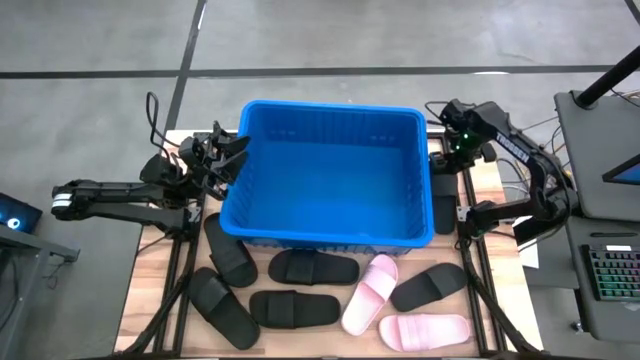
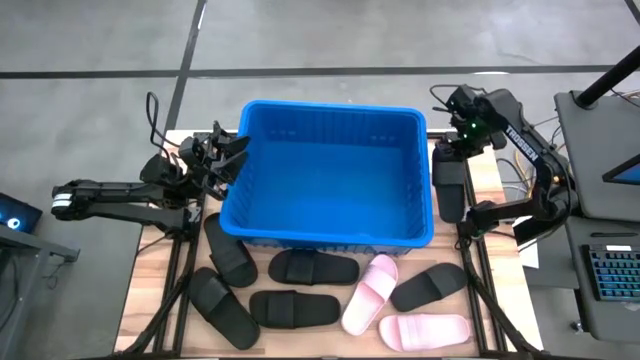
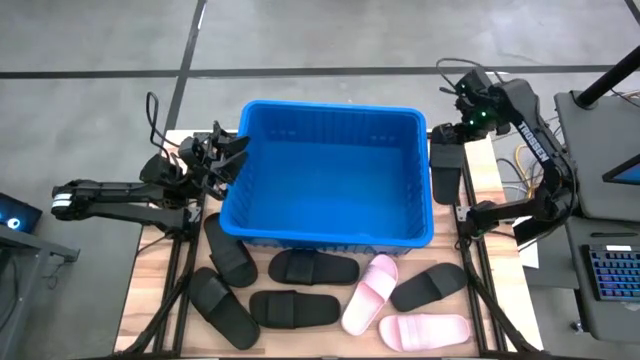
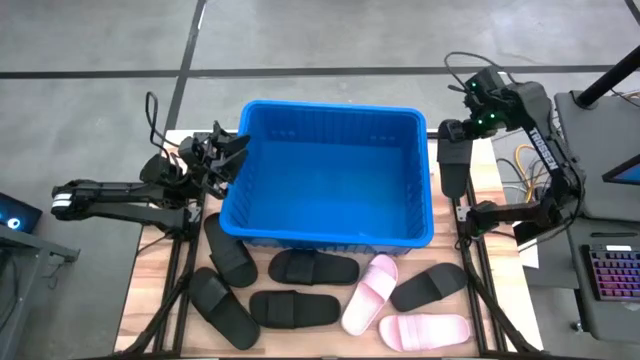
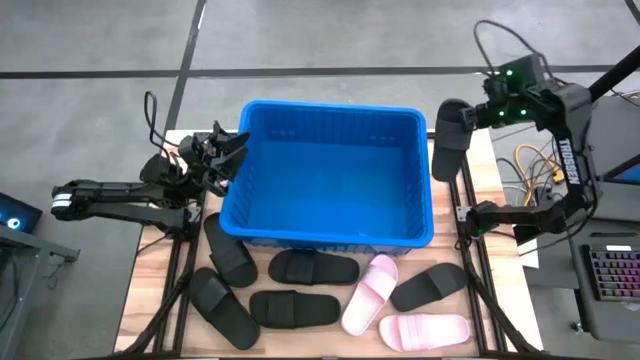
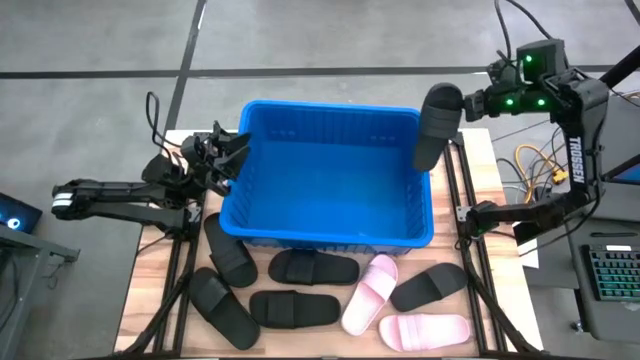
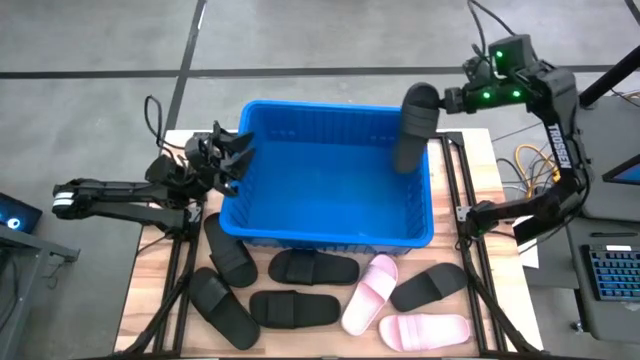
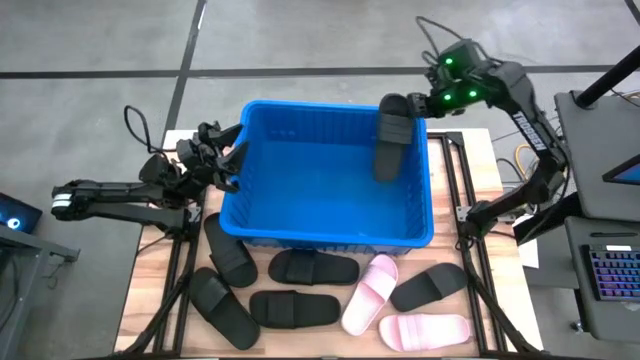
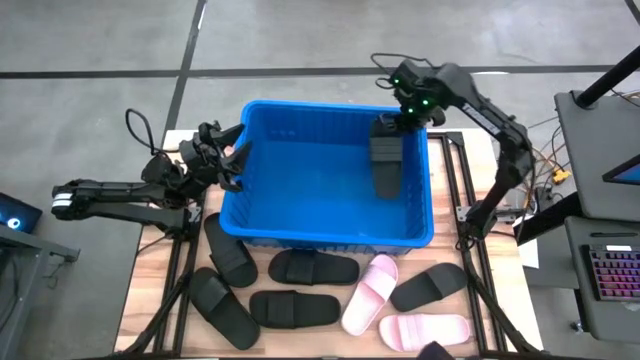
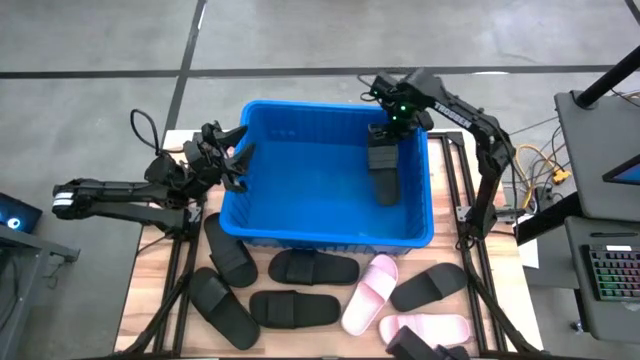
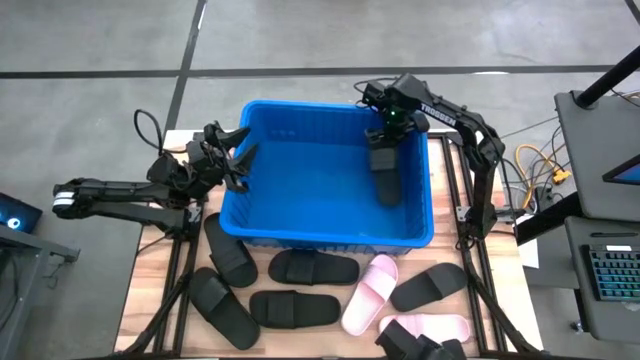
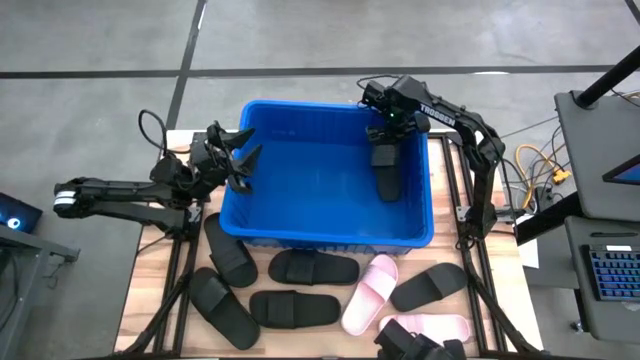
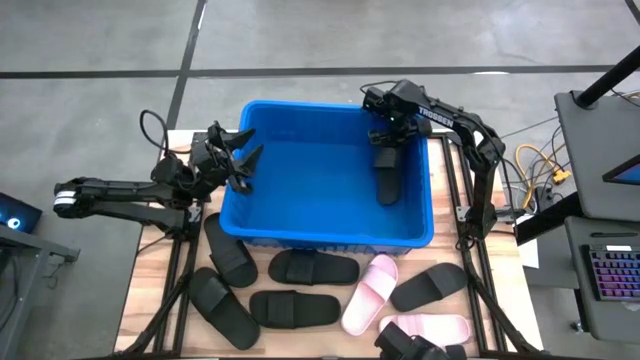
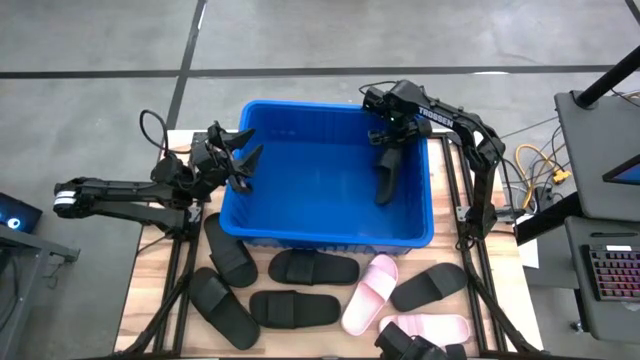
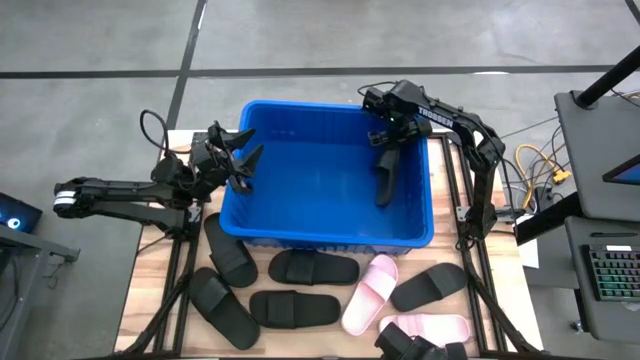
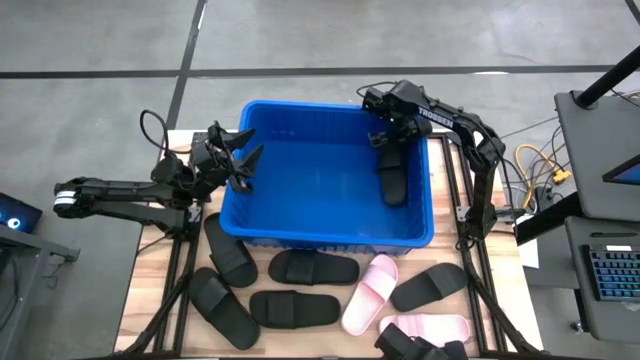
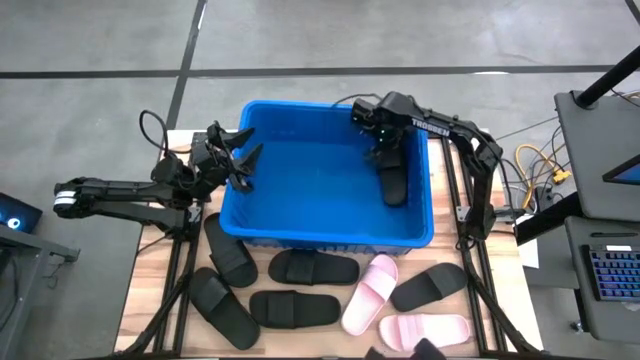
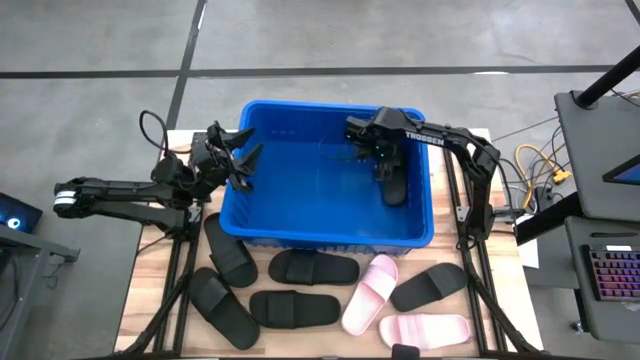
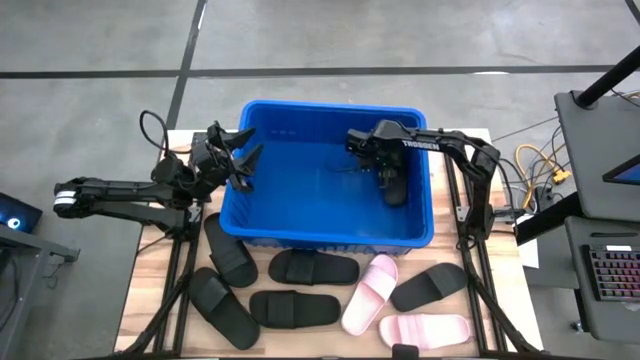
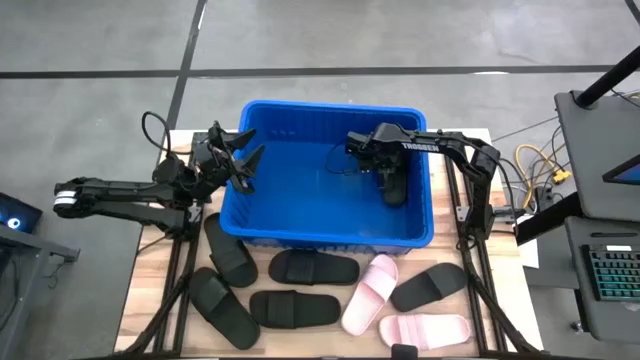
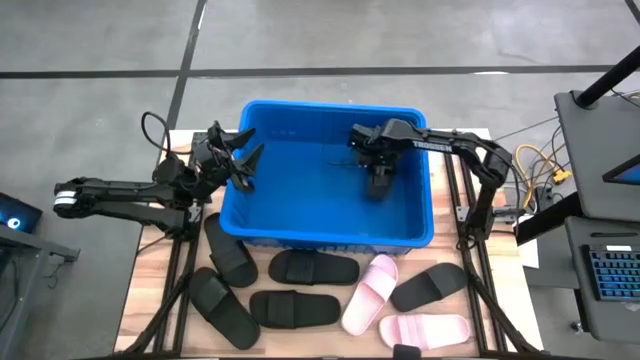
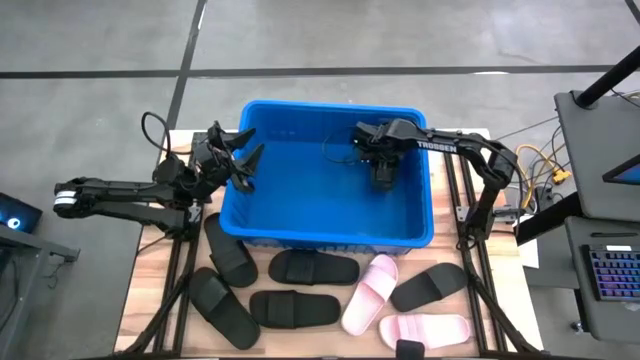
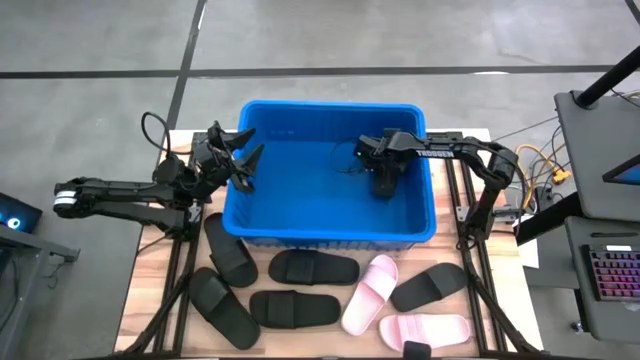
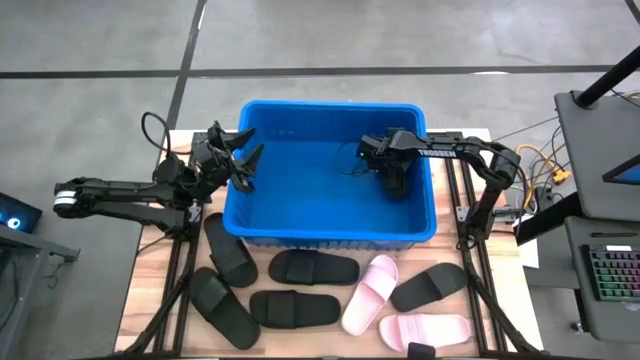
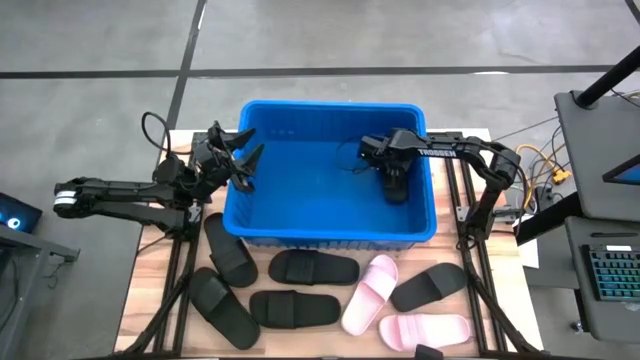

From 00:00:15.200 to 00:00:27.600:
Task: Pick and place slides into bin
Put the black slide into the blue container

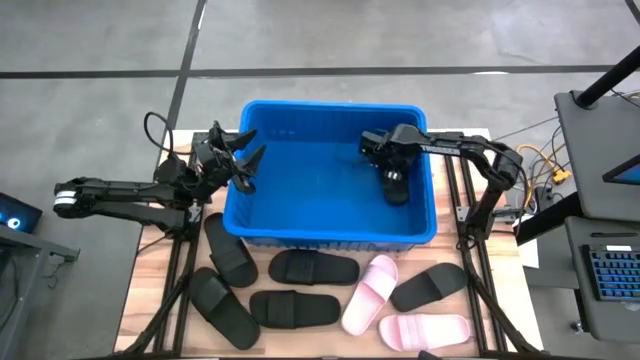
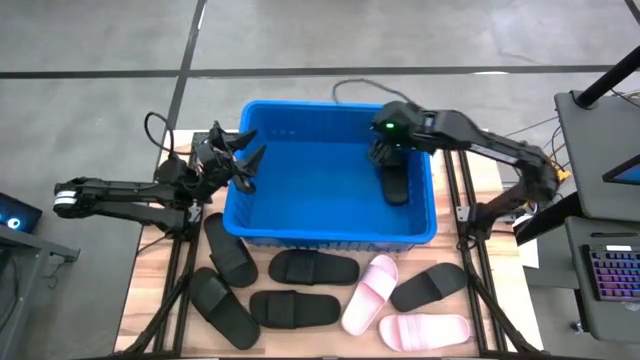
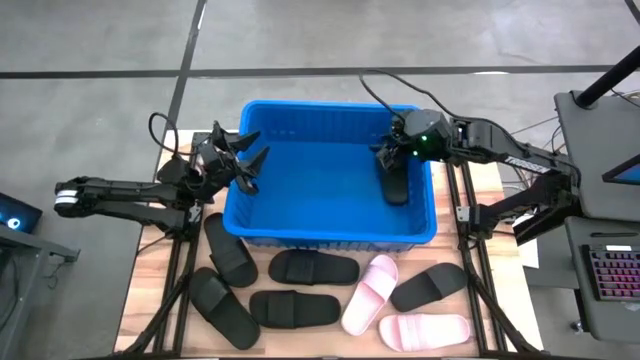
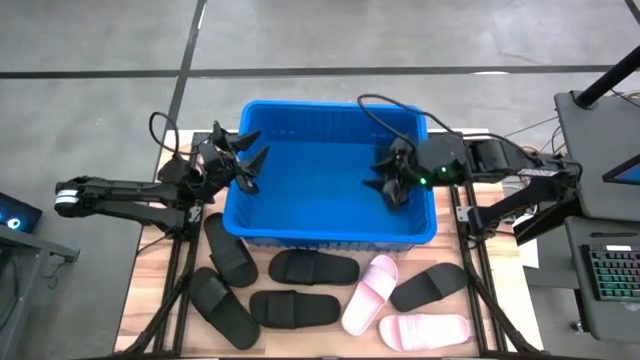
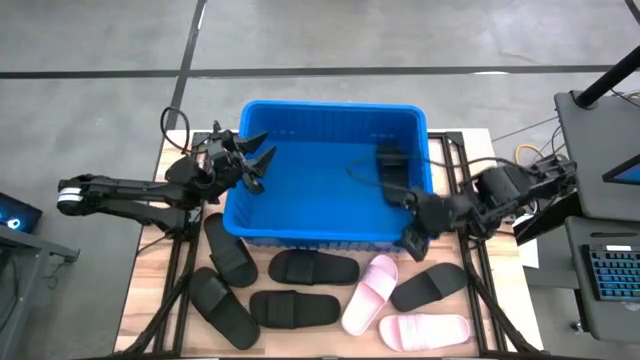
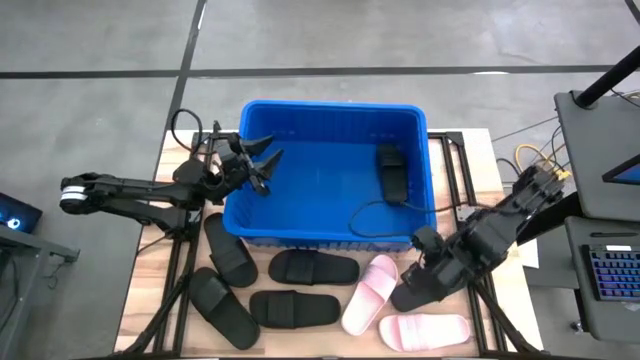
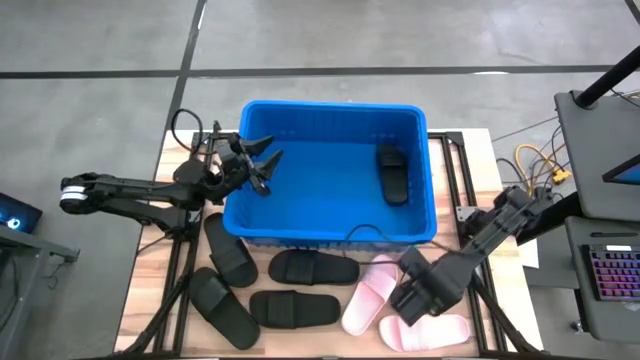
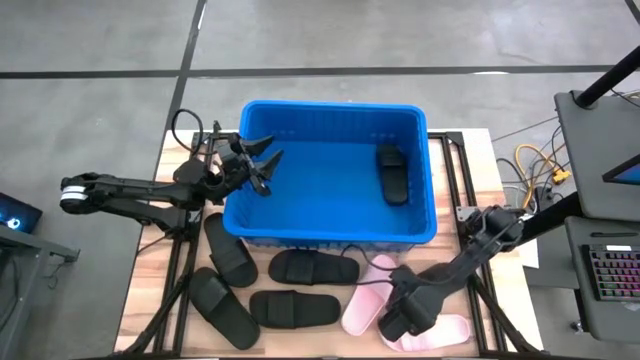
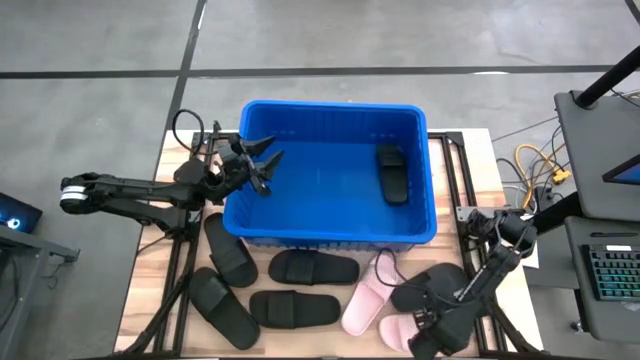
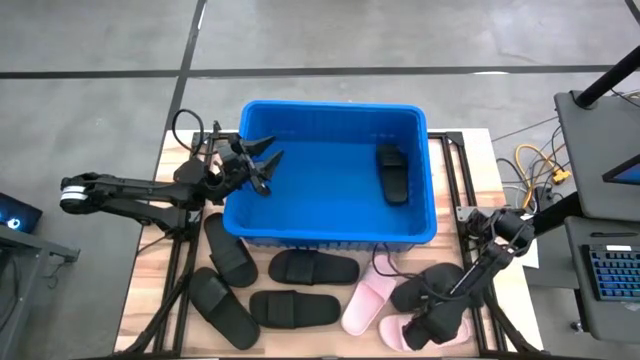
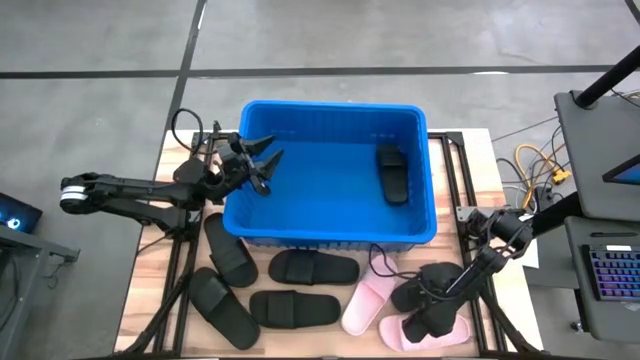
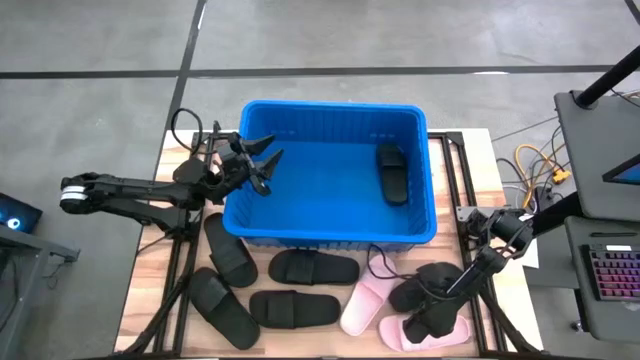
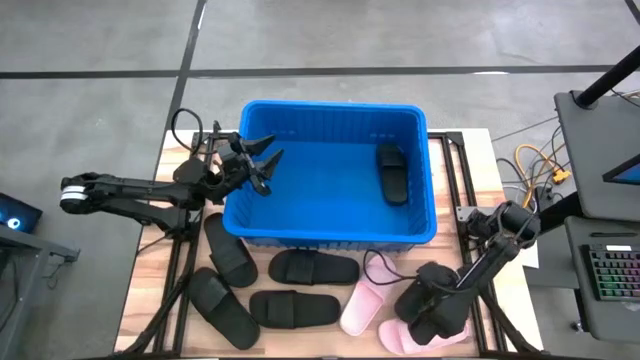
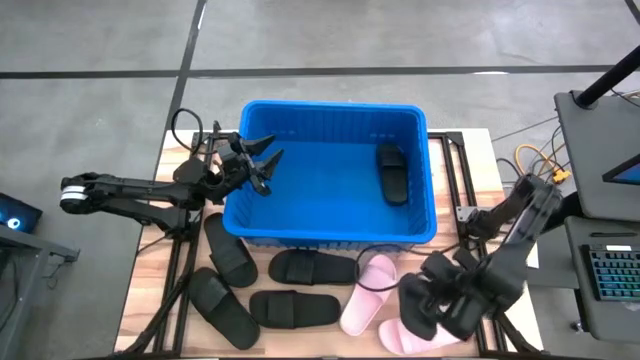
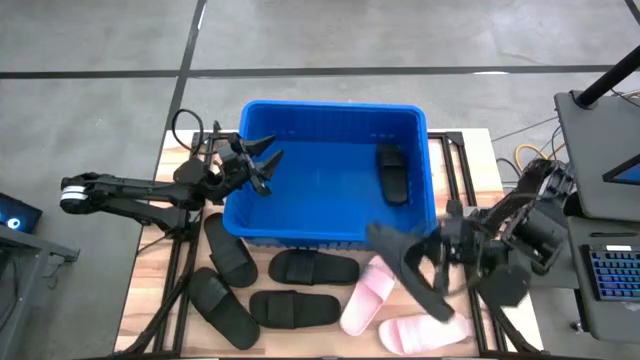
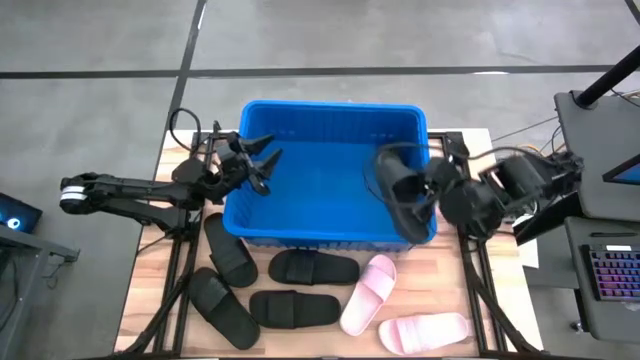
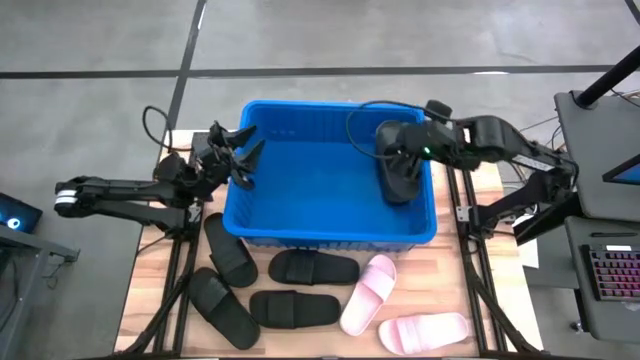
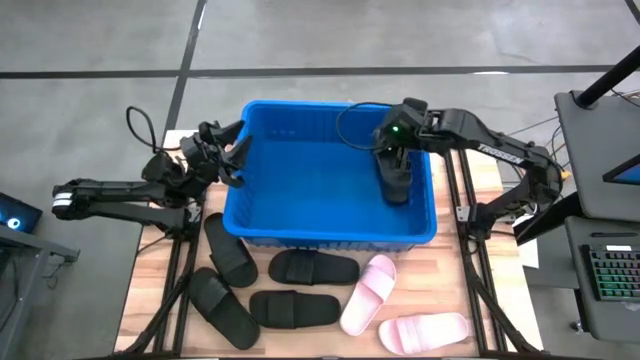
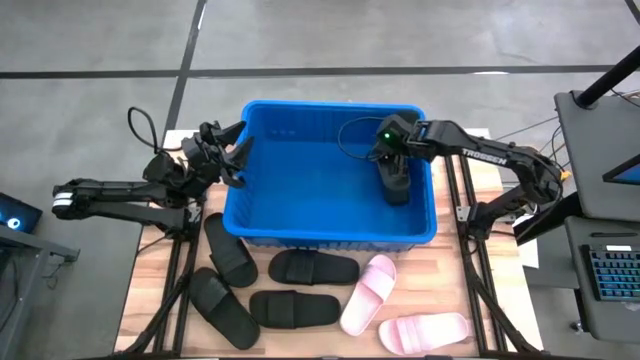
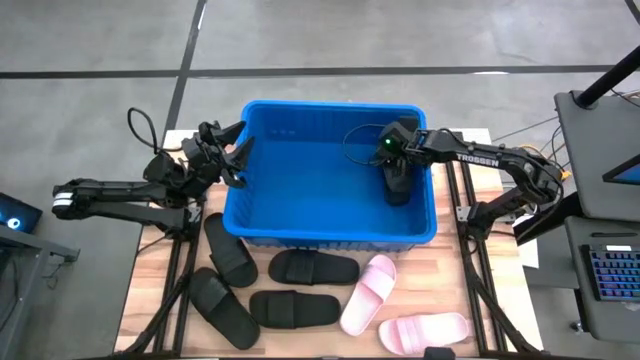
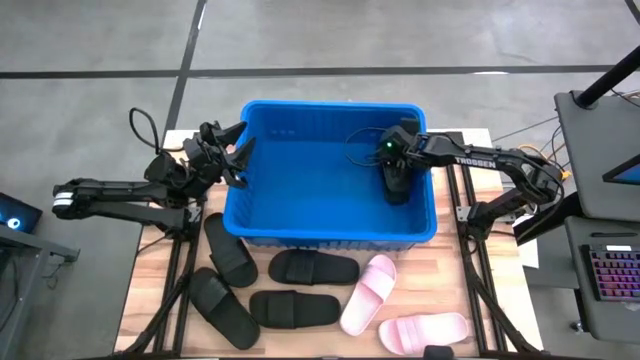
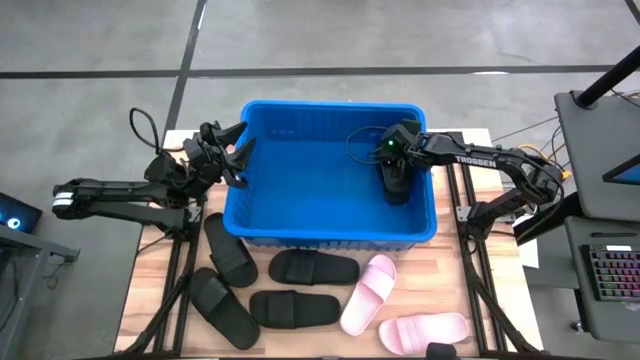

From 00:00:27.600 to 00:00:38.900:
Put the black slide into the blue container
